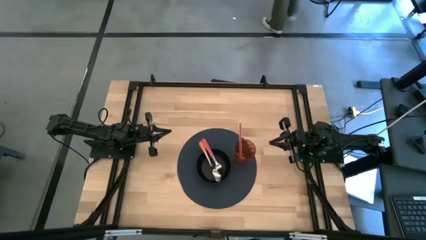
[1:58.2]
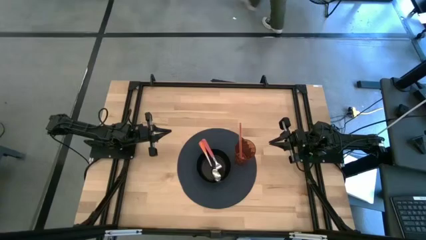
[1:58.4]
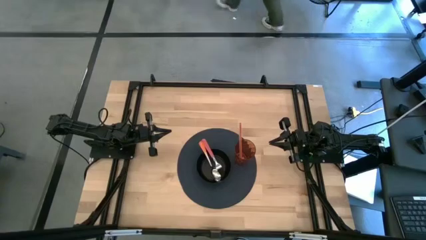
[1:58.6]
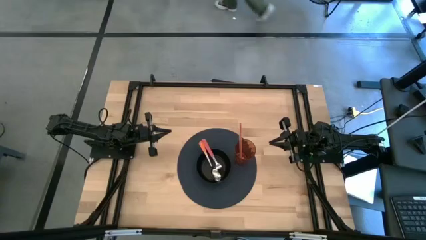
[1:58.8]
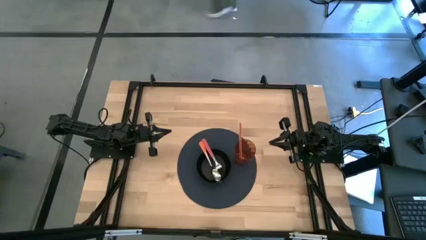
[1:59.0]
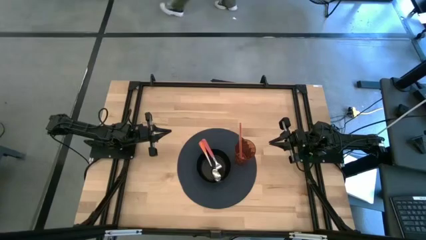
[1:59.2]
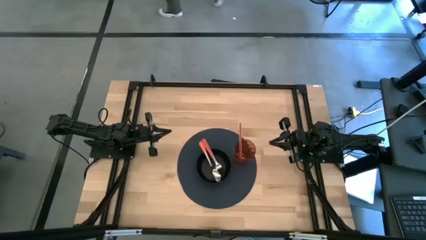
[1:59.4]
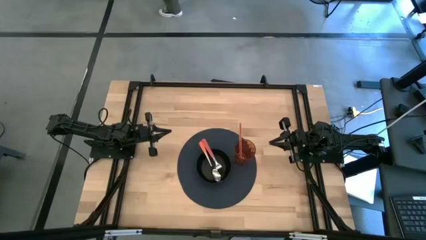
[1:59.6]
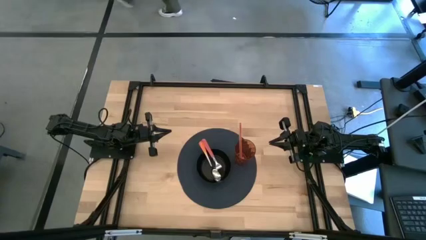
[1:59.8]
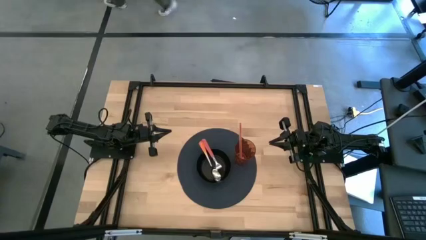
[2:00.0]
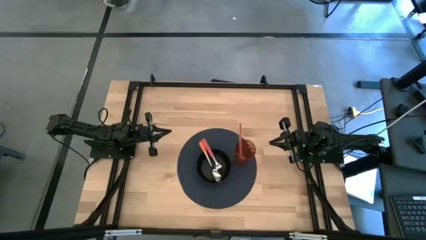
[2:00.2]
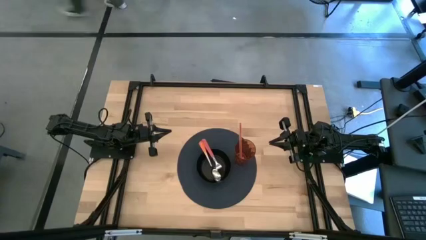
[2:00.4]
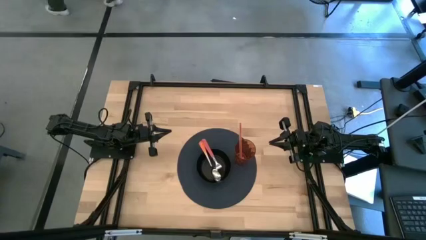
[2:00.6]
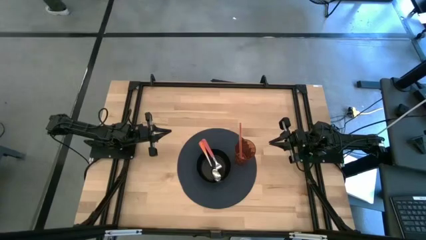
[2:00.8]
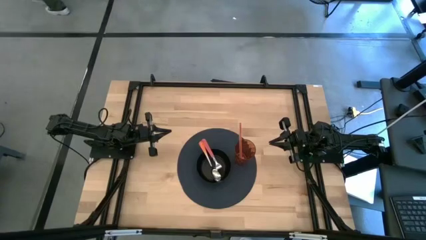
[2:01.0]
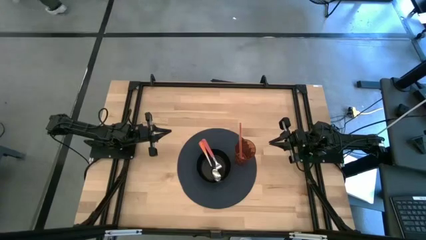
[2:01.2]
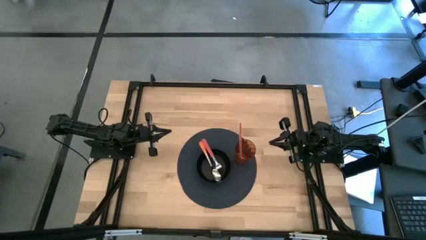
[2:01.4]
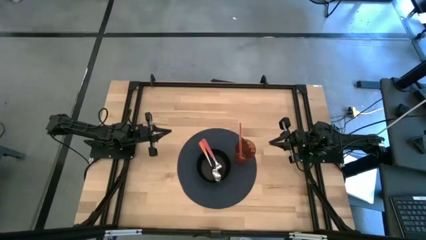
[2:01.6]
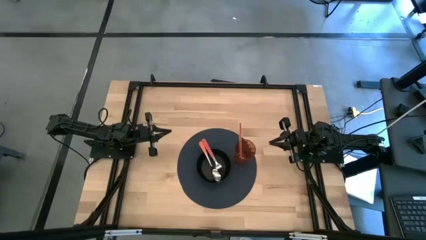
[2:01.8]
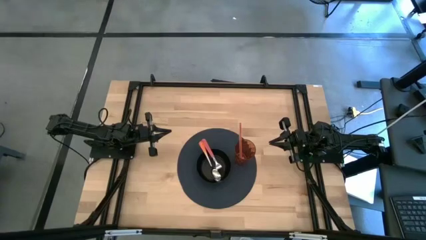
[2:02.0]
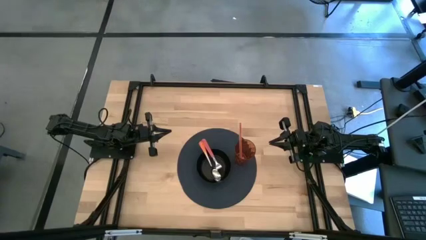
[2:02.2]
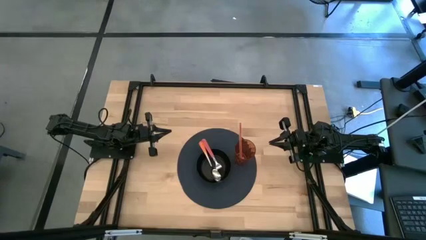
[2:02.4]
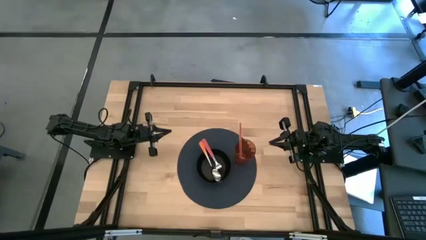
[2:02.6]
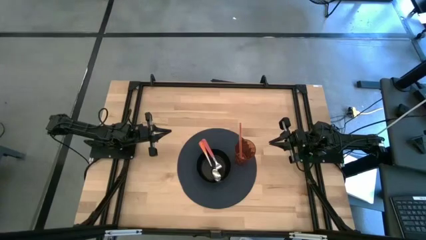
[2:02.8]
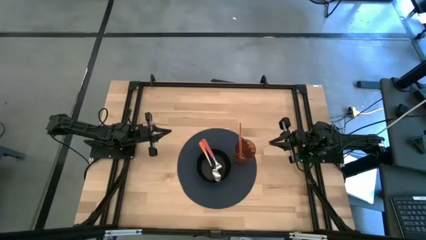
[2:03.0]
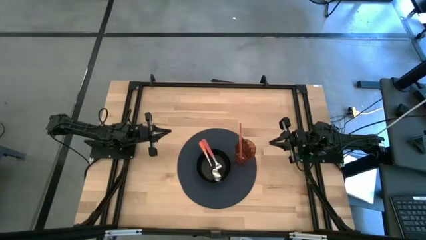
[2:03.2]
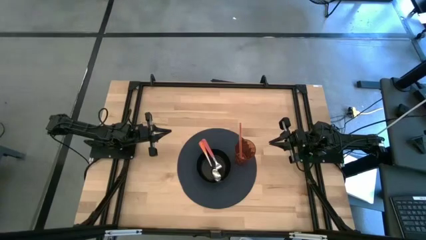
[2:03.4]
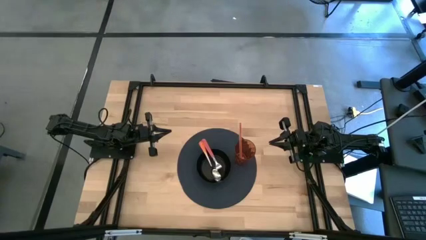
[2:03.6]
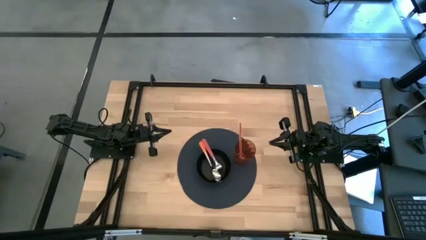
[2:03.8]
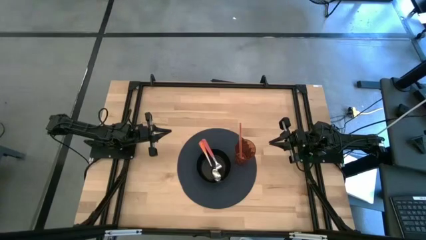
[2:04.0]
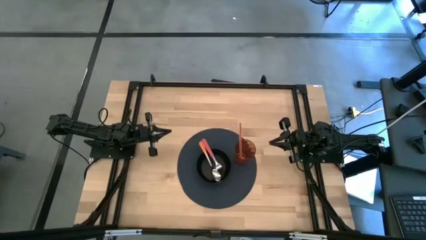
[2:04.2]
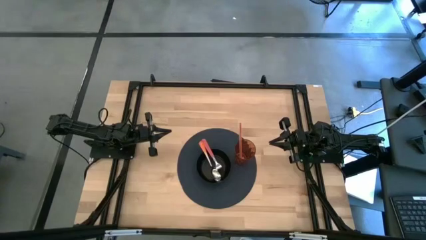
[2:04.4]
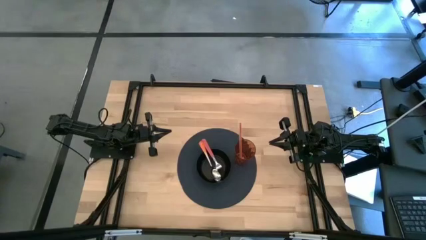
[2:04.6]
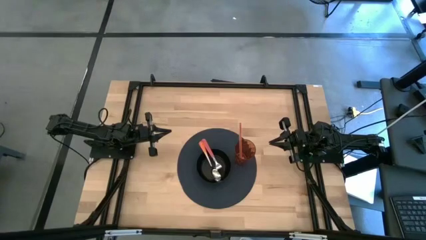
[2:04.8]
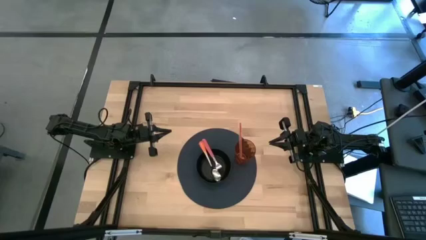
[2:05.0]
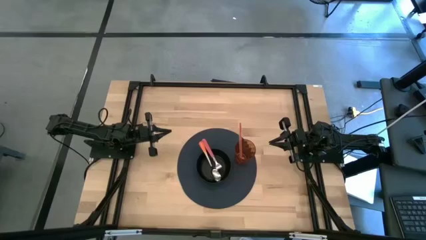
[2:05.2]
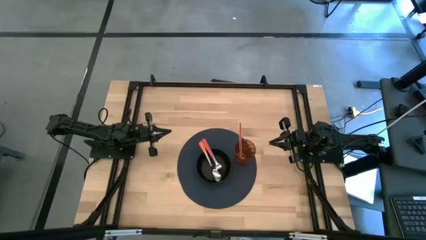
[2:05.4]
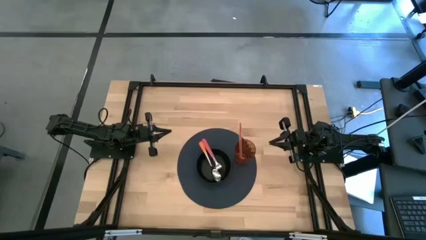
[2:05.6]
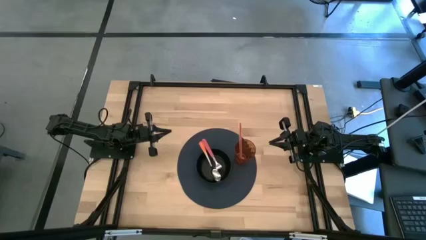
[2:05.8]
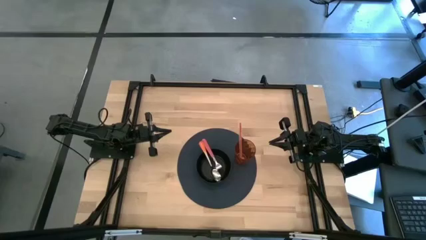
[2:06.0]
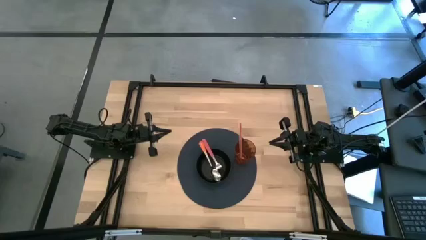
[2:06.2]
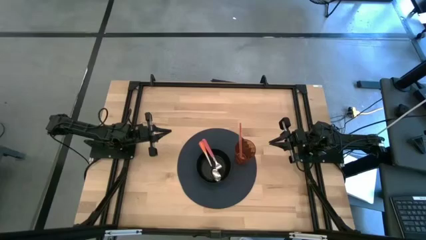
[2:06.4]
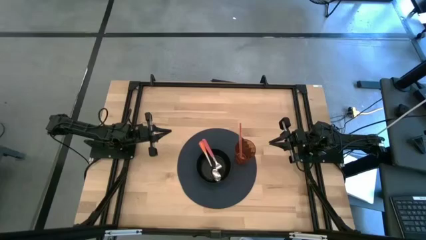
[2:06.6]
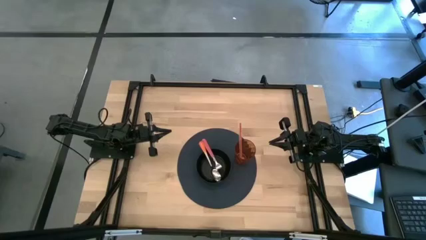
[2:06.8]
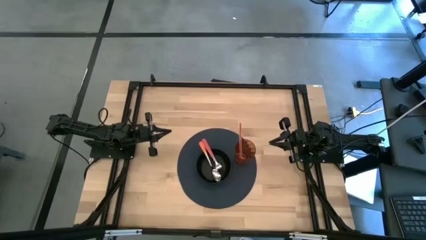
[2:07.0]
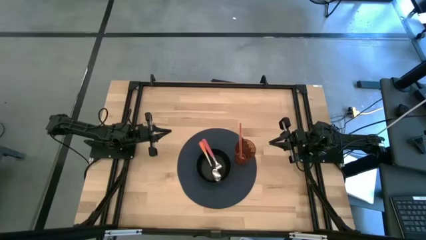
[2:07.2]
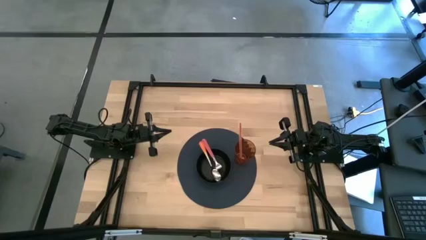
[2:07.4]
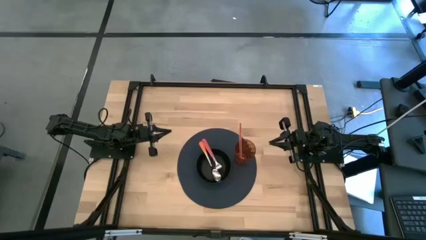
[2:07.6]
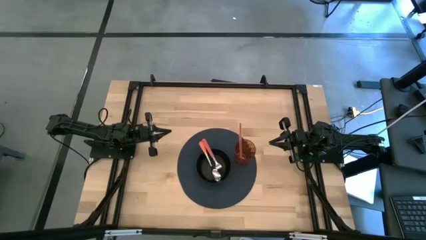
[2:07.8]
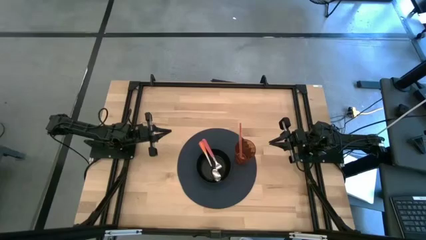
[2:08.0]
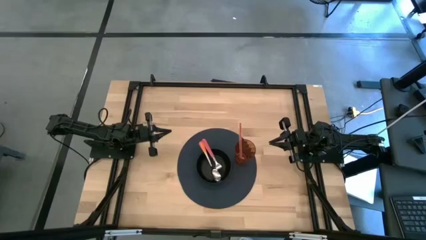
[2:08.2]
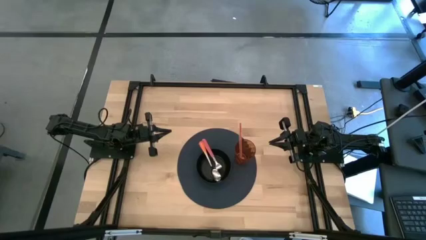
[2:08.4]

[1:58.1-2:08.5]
Task: Pick & Place Utensil
Return to Home Position

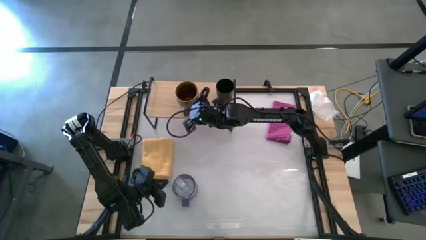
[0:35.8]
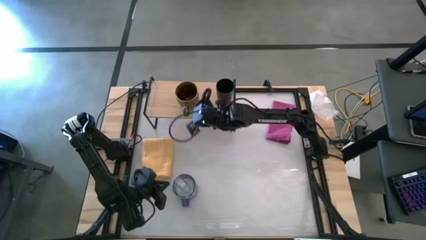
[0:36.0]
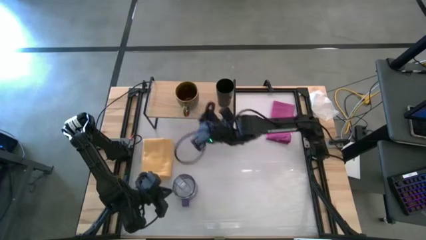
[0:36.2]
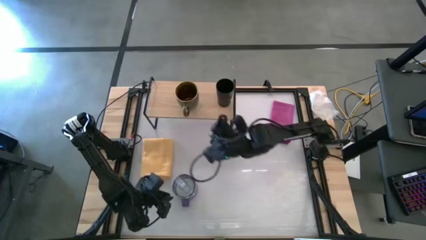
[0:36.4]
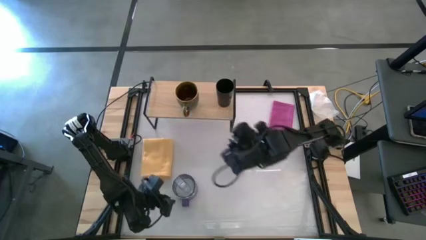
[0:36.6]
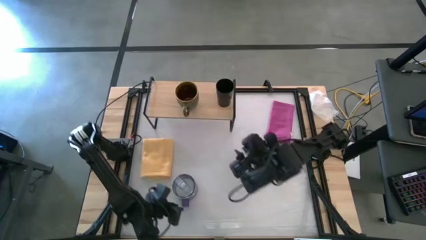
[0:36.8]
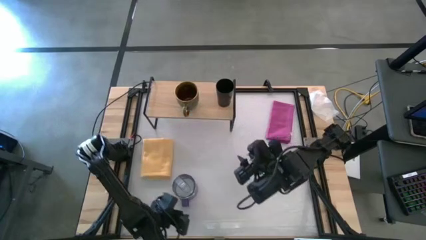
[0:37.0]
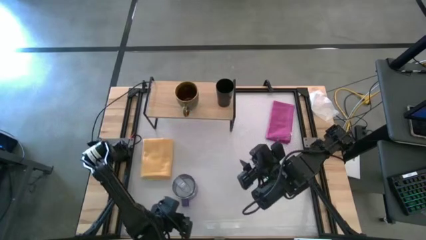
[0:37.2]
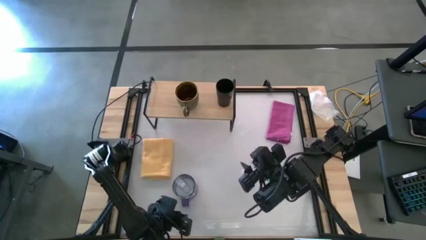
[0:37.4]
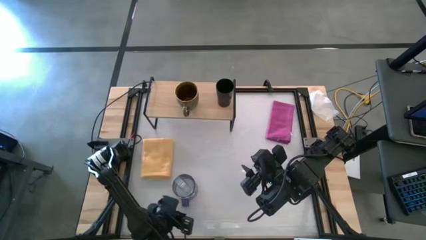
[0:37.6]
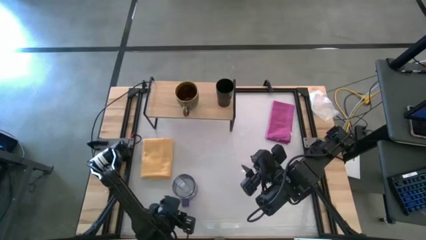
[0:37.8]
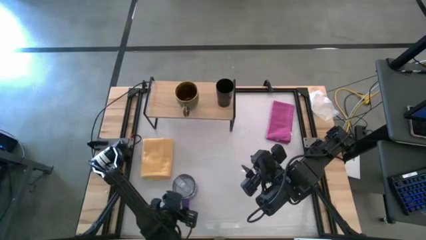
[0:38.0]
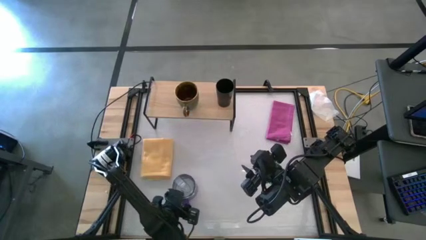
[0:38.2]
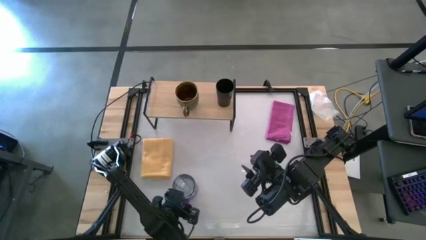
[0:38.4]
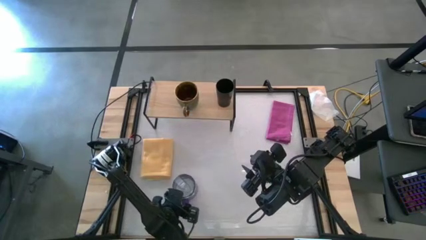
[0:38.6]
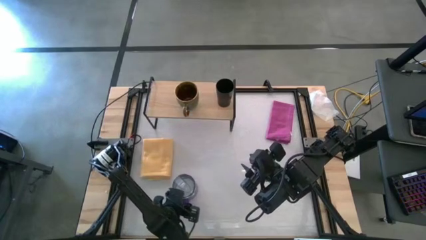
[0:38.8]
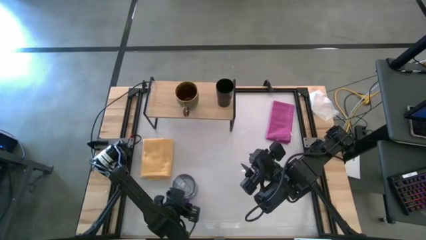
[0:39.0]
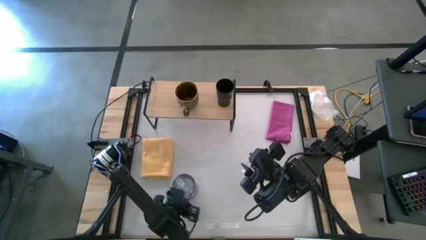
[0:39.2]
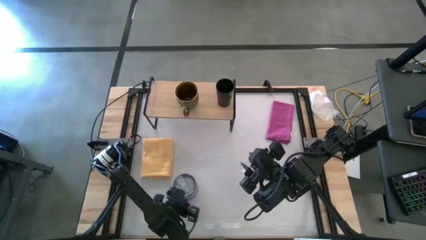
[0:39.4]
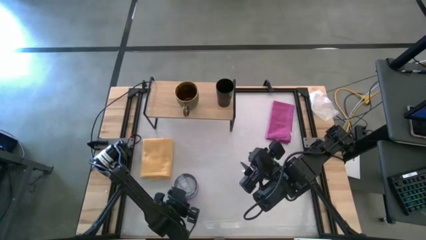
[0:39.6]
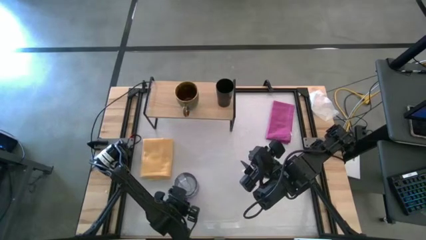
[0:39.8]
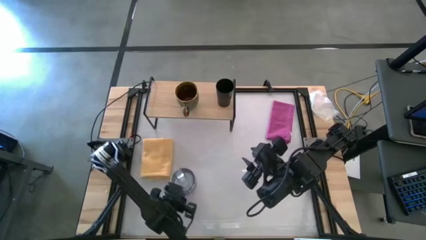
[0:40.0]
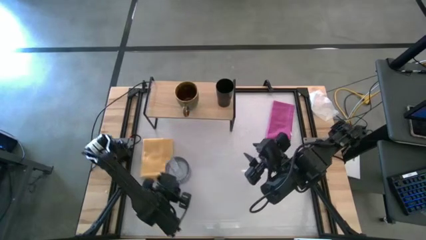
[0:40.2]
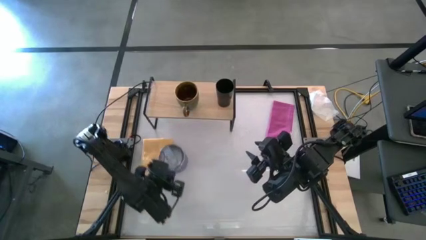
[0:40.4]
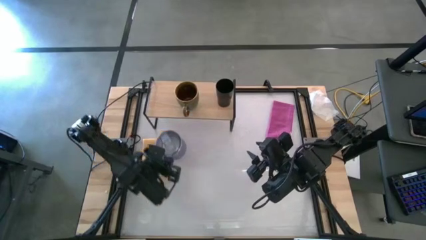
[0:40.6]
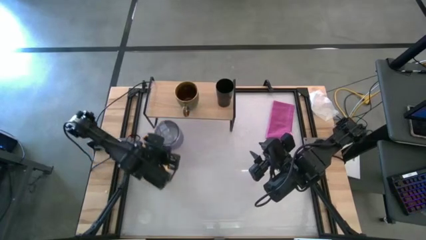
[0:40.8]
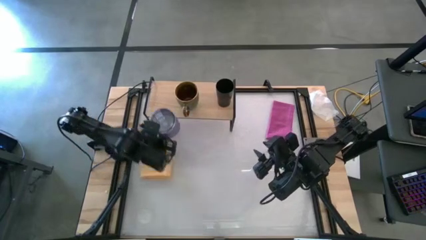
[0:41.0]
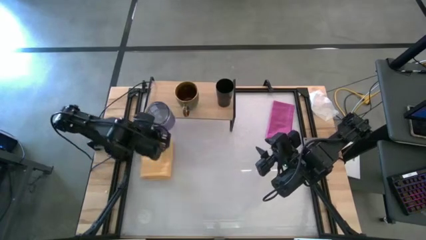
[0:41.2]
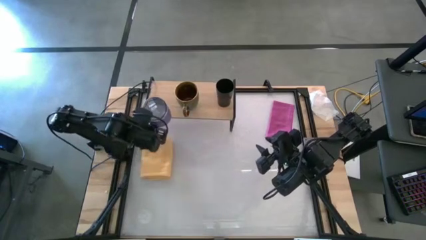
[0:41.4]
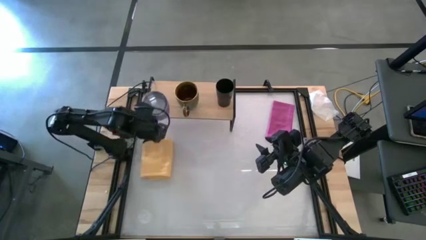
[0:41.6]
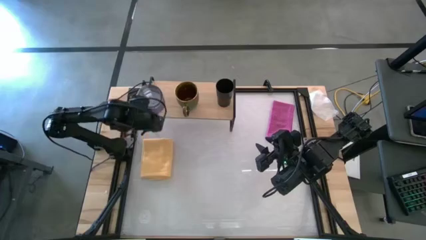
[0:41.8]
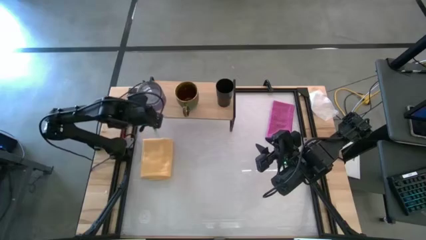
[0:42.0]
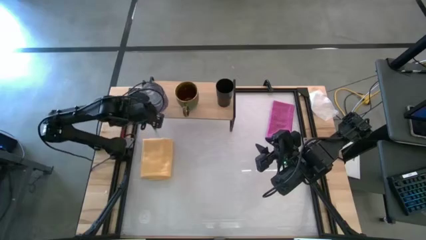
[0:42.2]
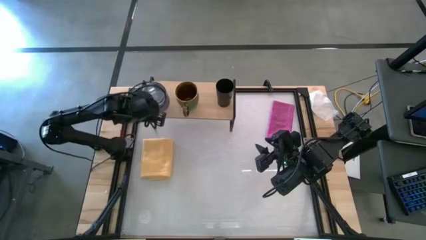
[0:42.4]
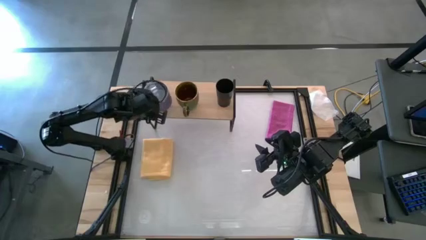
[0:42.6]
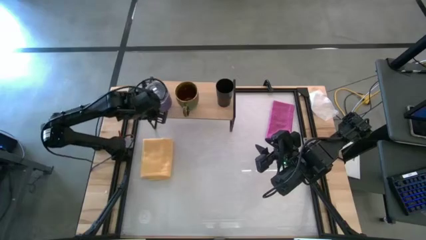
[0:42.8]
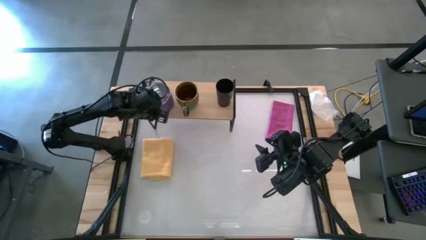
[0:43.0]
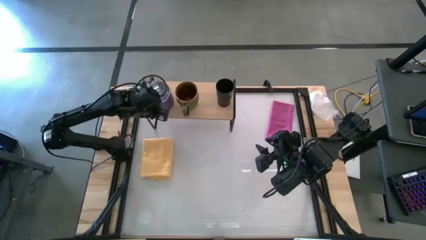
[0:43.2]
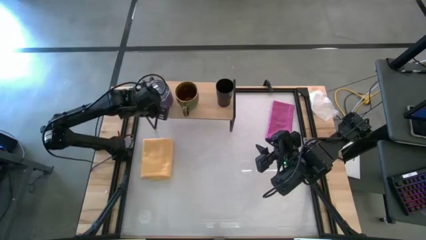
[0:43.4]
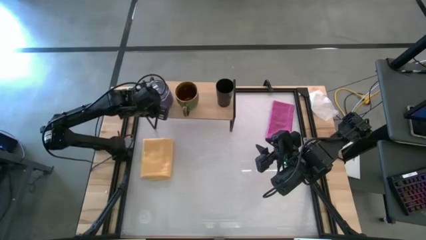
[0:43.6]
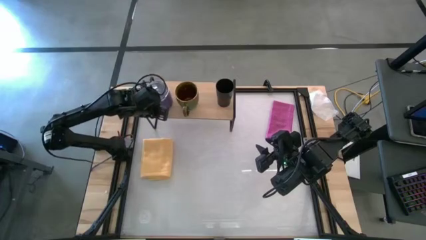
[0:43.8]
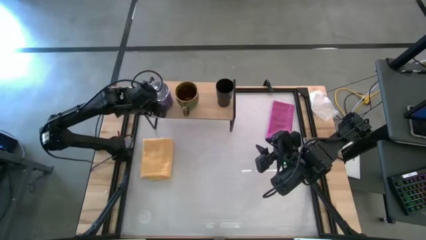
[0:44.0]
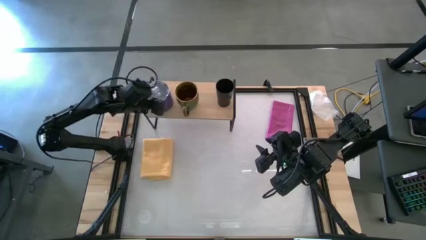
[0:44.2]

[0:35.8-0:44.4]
Task: Stack small to large cups/mugs on shelf
Put the purple mug on the shelf
